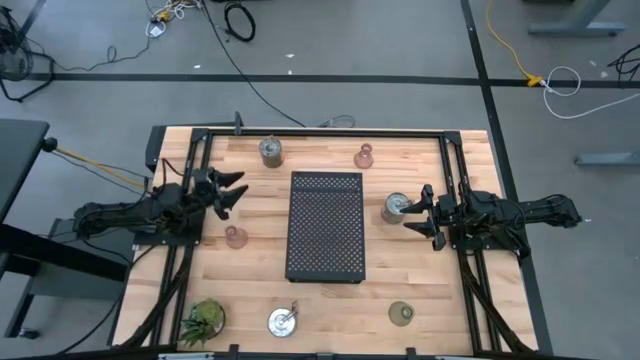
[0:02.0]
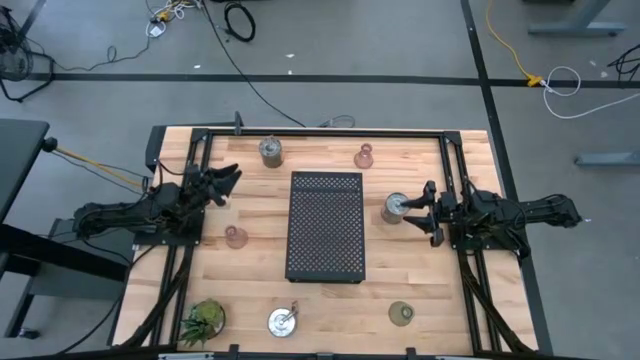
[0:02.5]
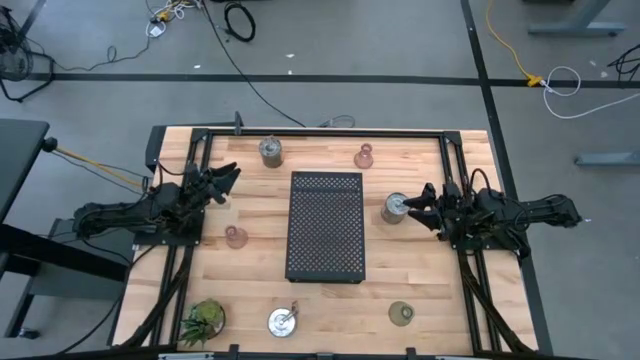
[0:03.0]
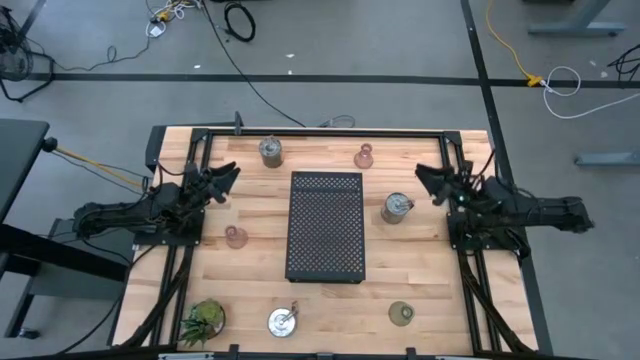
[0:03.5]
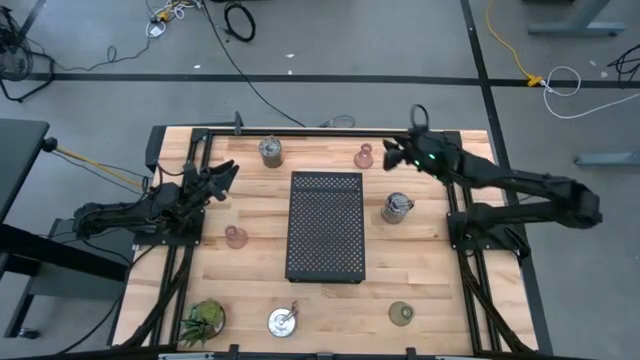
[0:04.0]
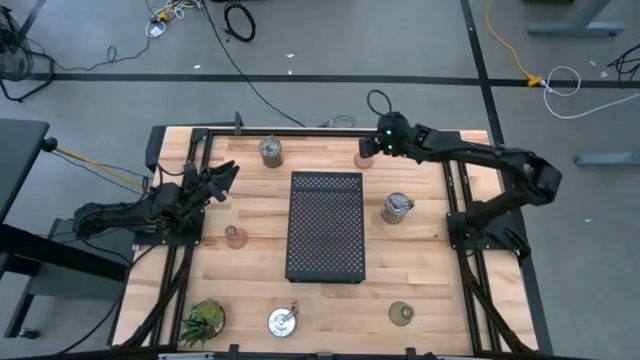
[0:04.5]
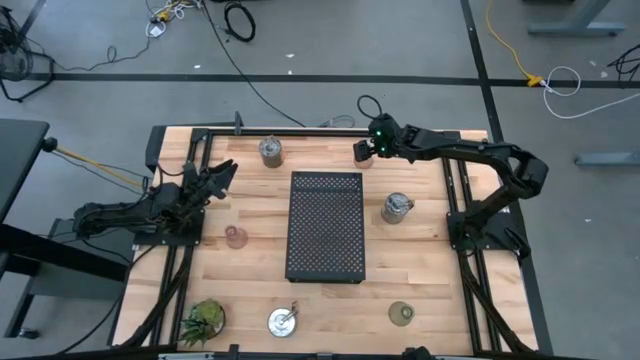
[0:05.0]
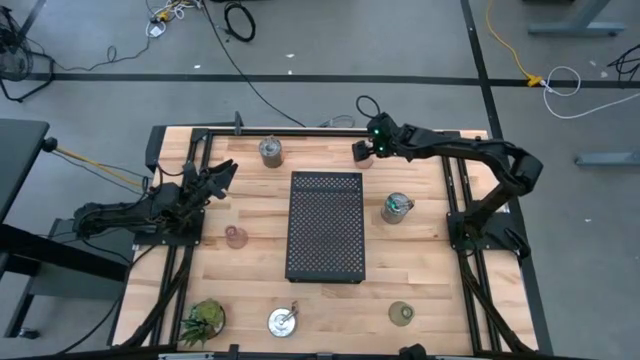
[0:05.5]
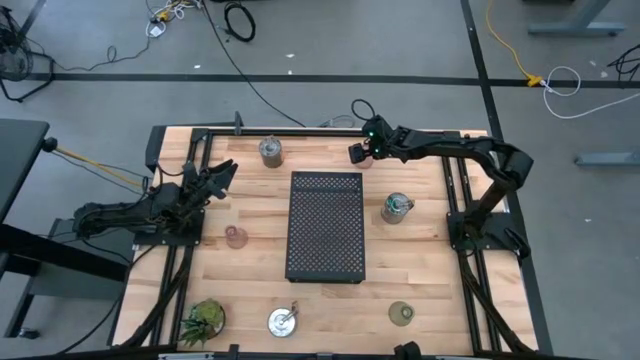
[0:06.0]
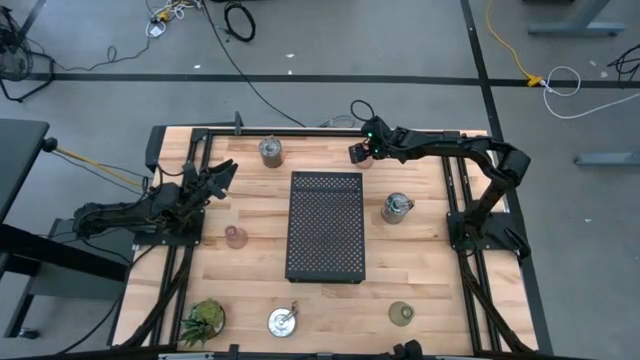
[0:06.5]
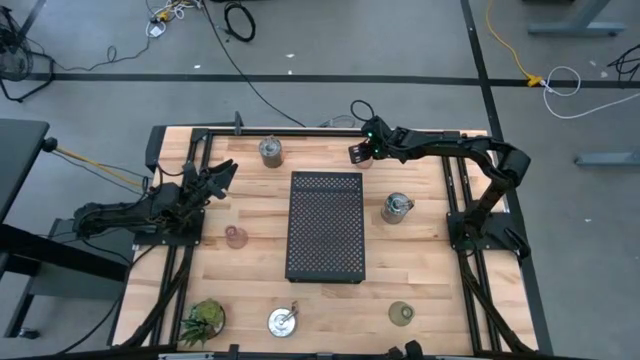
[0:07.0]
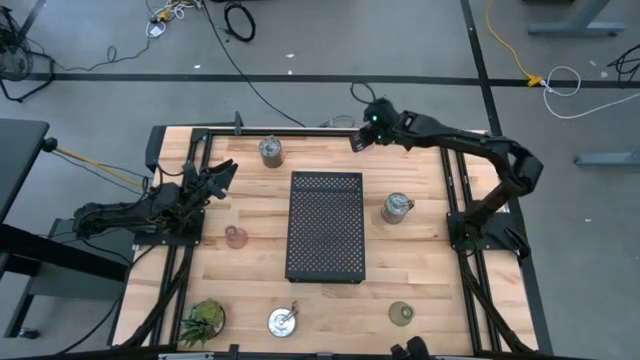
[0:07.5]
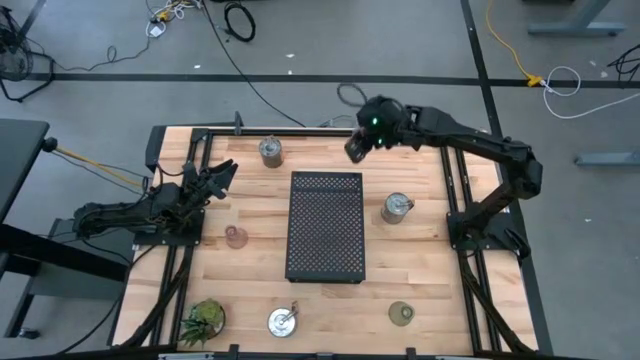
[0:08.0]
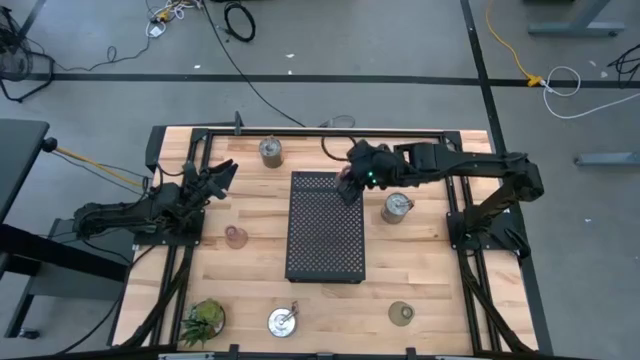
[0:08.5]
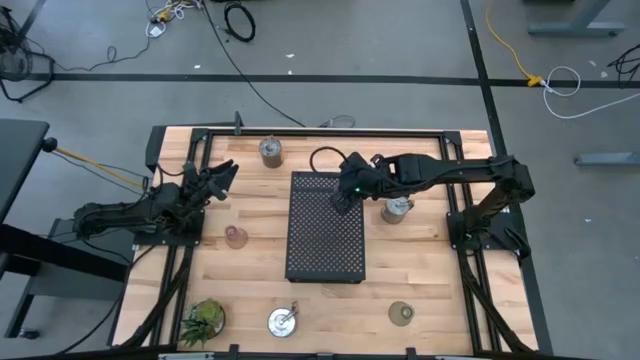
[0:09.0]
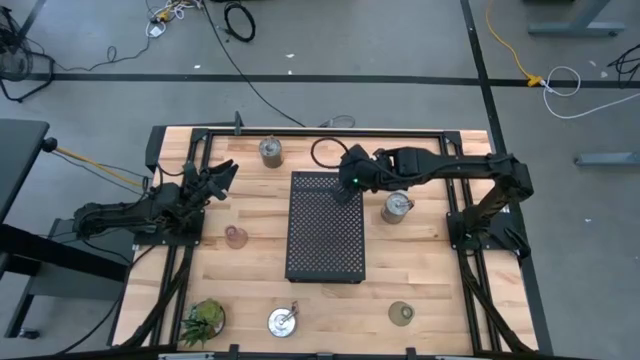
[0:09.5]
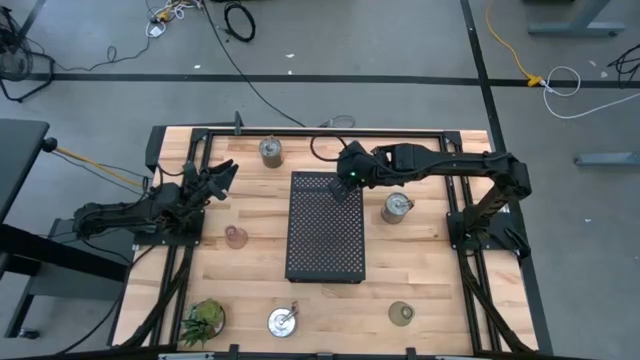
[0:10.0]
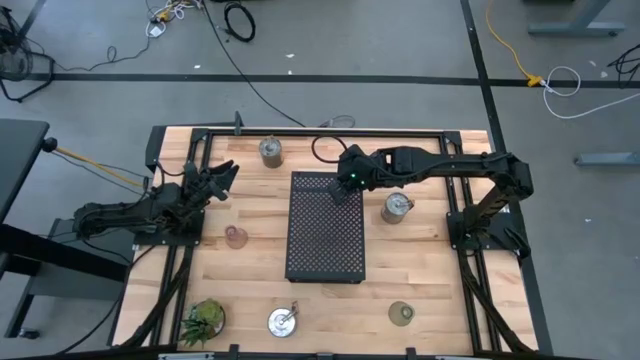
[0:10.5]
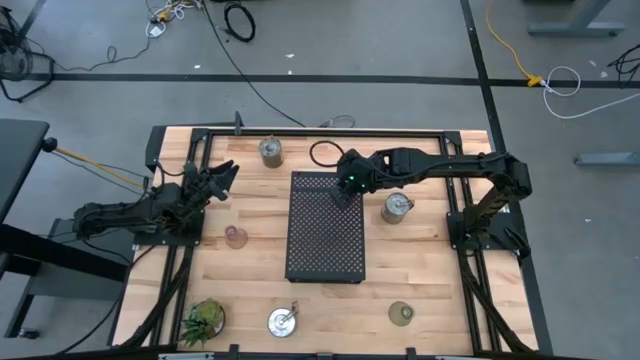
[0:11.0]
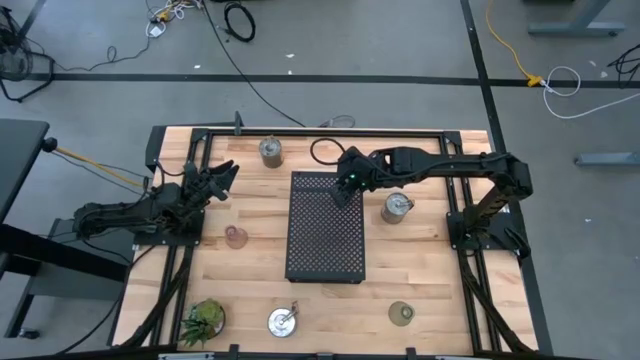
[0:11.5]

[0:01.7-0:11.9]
Task: Pick & Place candle stick holders
Put the top pink glass candle holder on the shelf

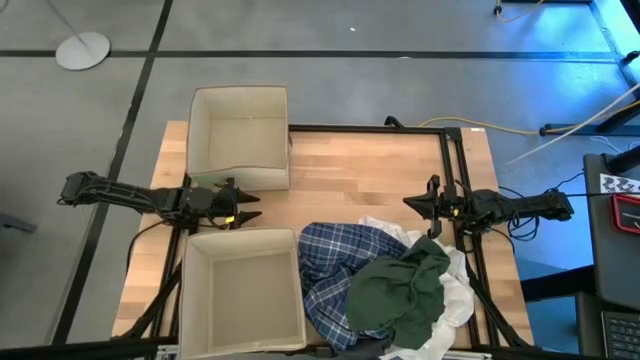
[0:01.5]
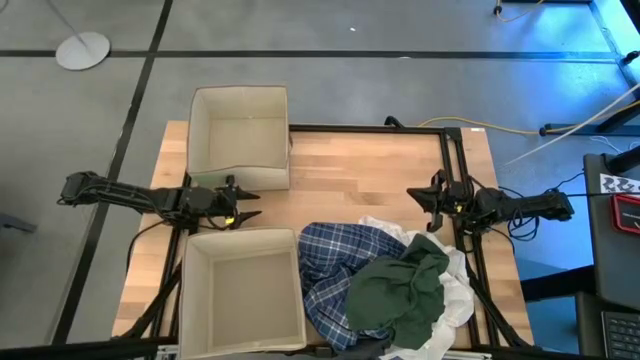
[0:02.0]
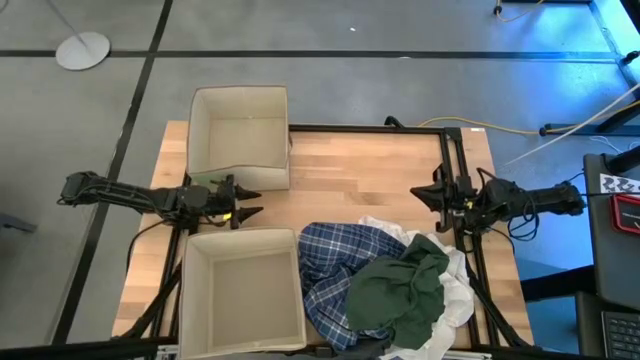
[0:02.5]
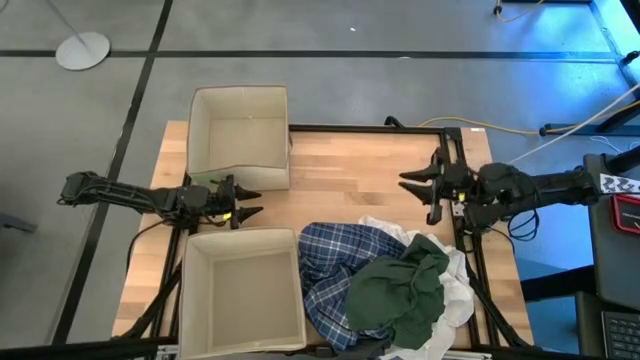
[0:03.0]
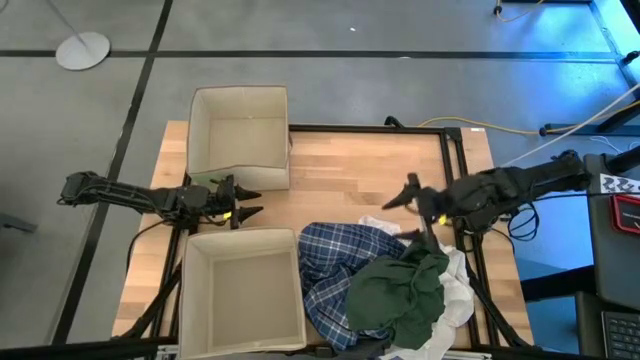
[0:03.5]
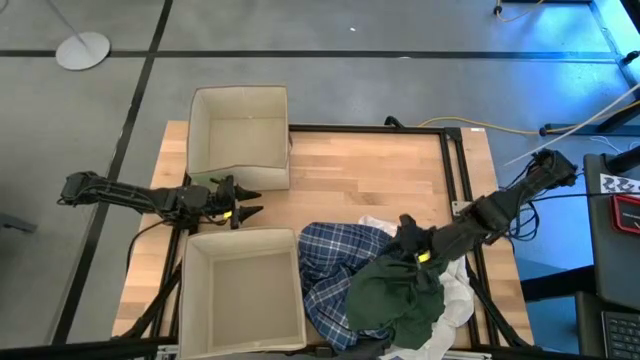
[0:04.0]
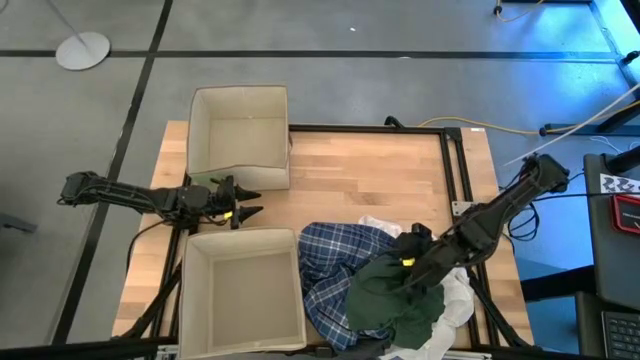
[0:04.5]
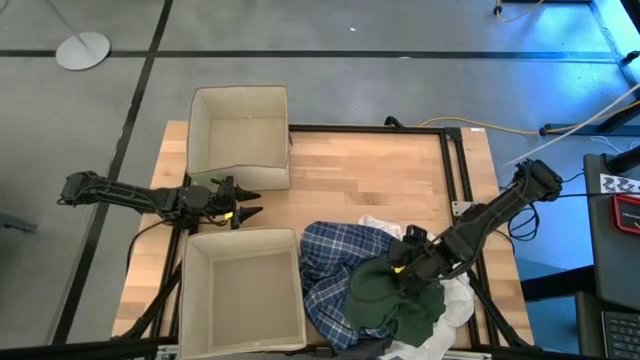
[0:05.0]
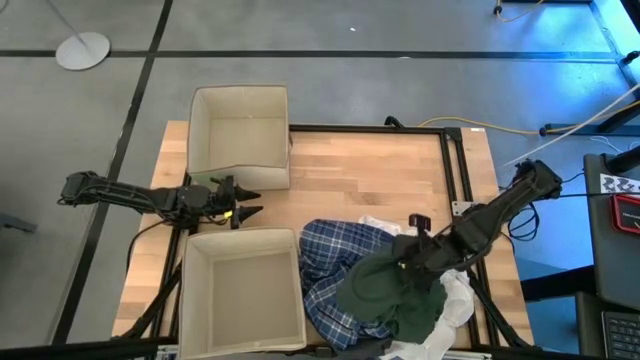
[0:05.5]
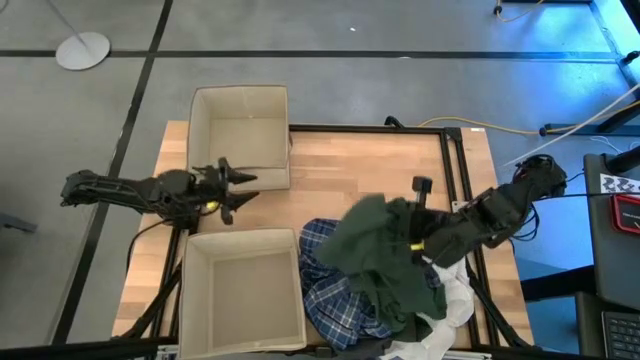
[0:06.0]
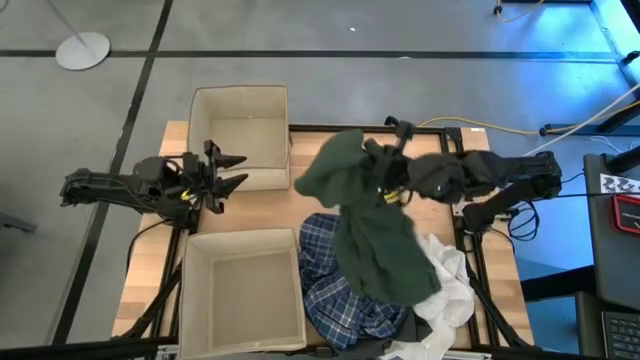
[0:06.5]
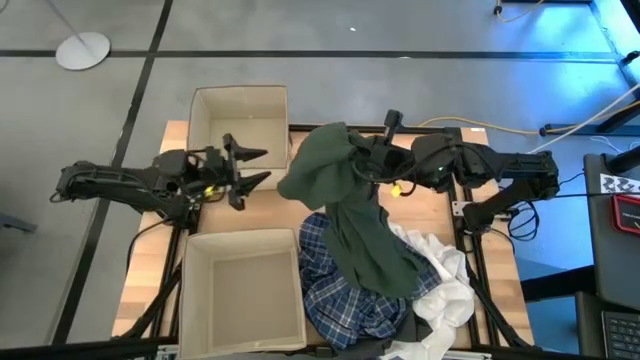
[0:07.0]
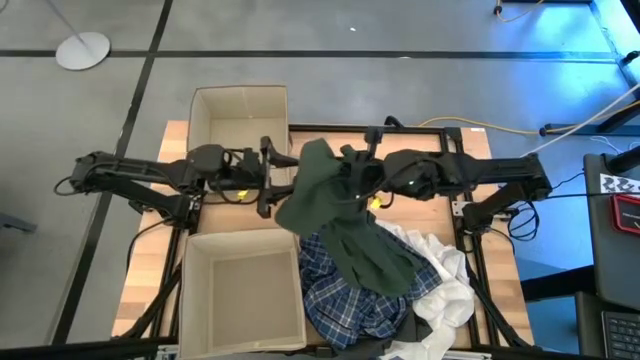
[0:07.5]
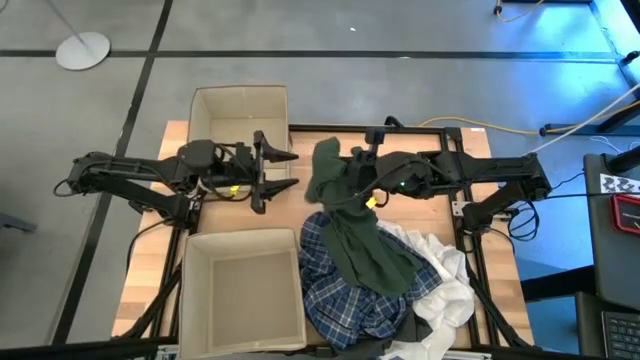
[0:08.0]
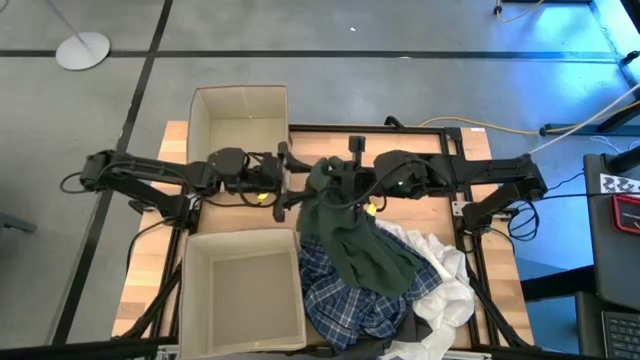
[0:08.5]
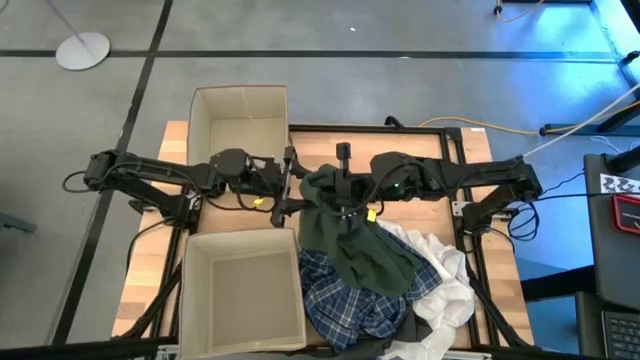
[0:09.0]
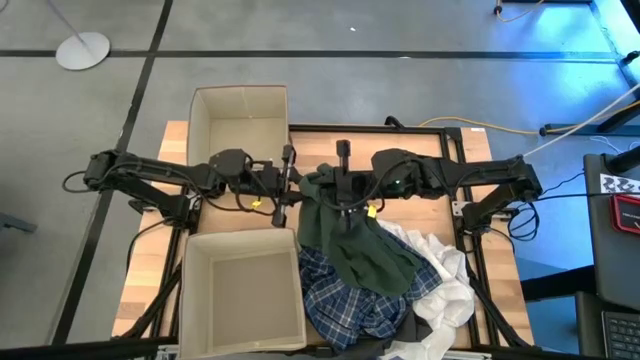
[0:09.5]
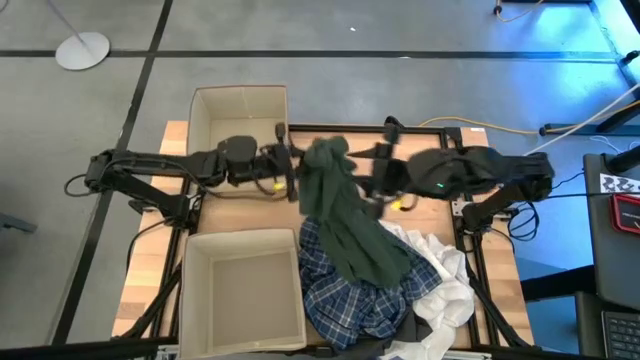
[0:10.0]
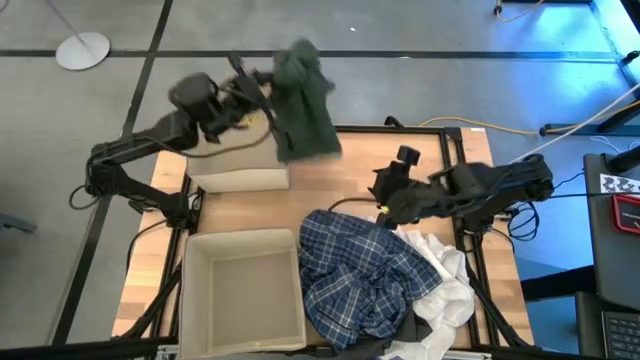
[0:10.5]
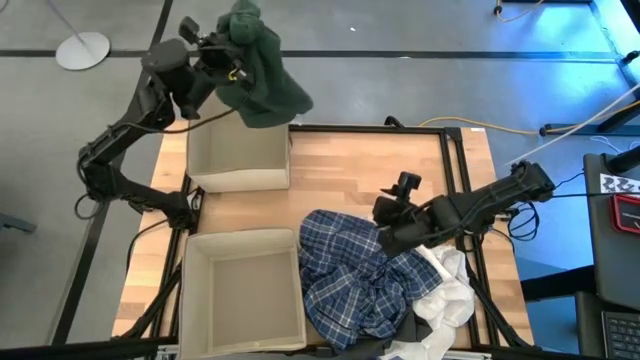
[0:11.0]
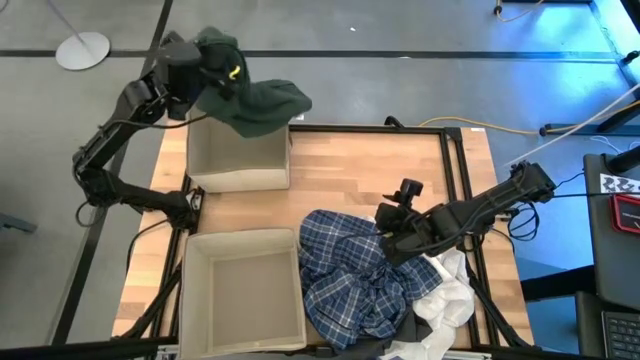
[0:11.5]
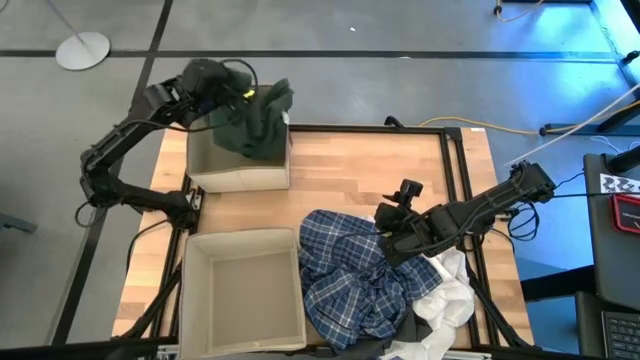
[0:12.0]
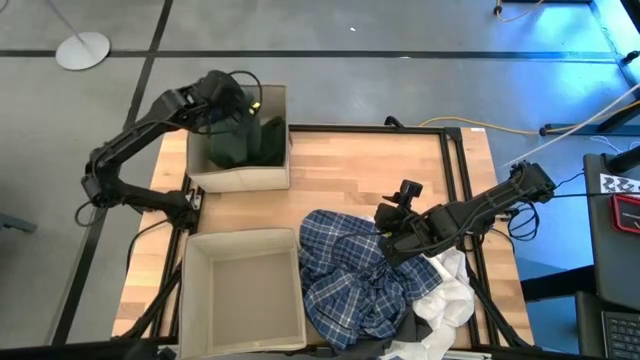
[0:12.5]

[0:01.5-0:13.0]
Task: Sort clothes
Put the green shirt into the top laundry organizer
